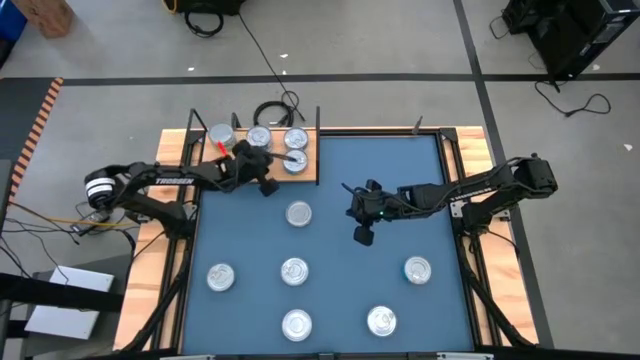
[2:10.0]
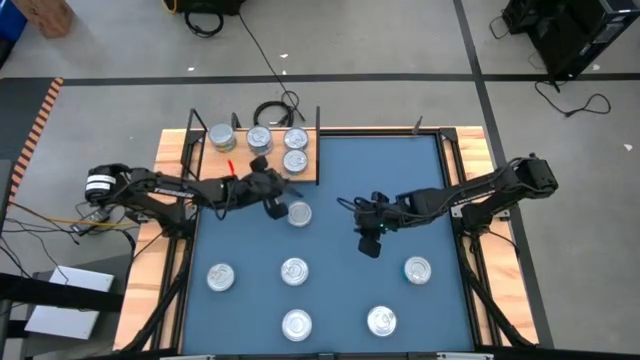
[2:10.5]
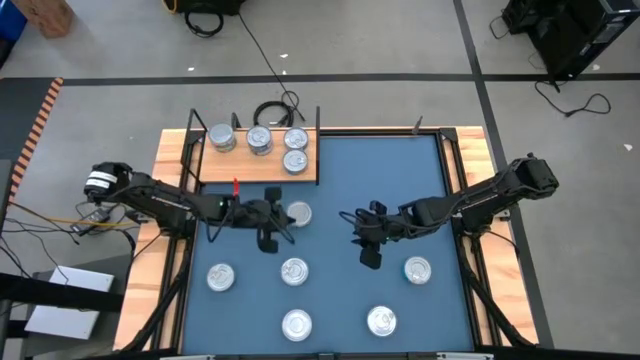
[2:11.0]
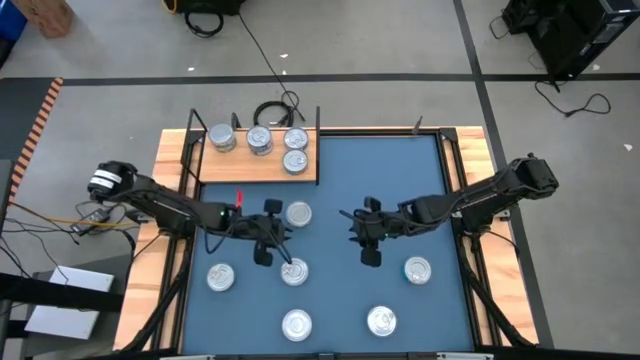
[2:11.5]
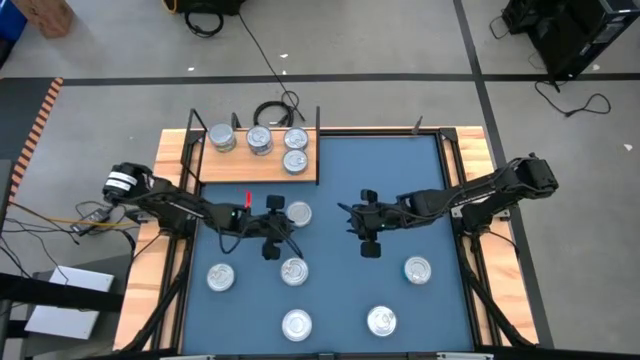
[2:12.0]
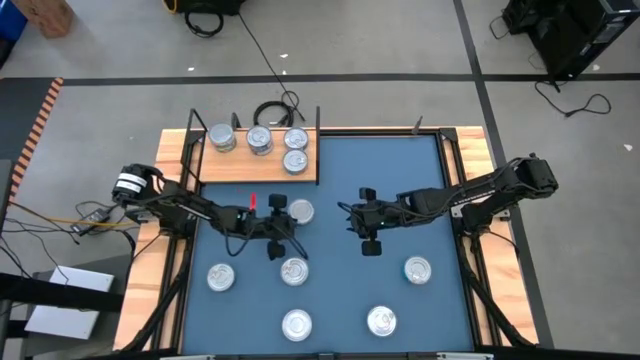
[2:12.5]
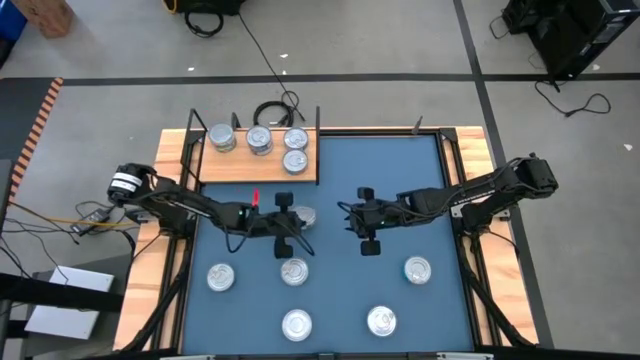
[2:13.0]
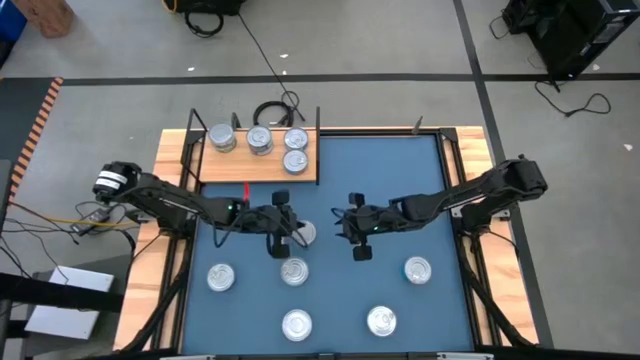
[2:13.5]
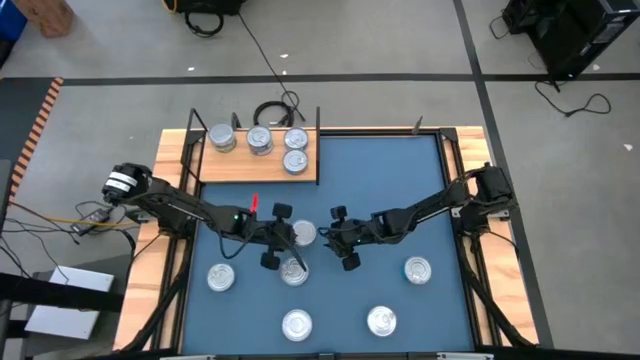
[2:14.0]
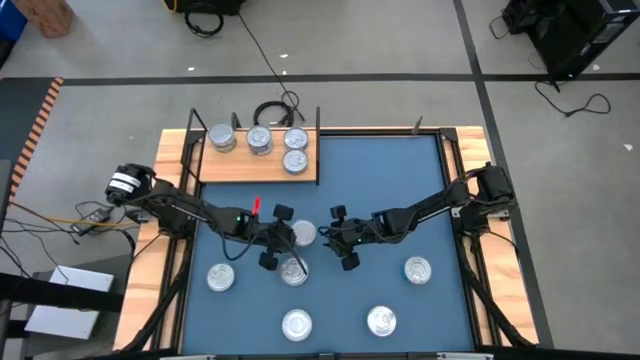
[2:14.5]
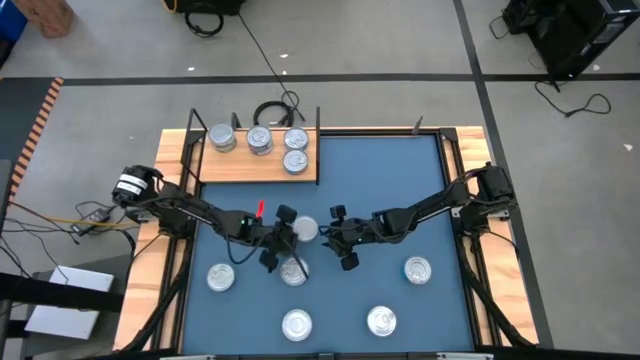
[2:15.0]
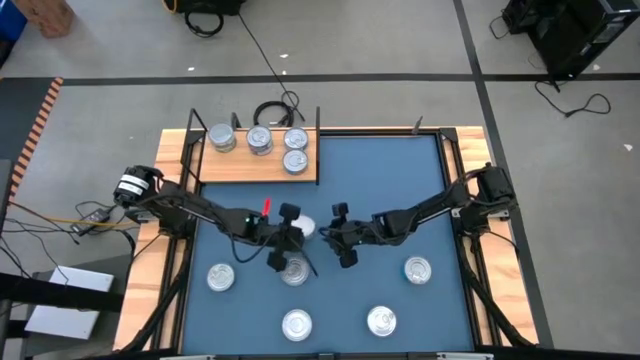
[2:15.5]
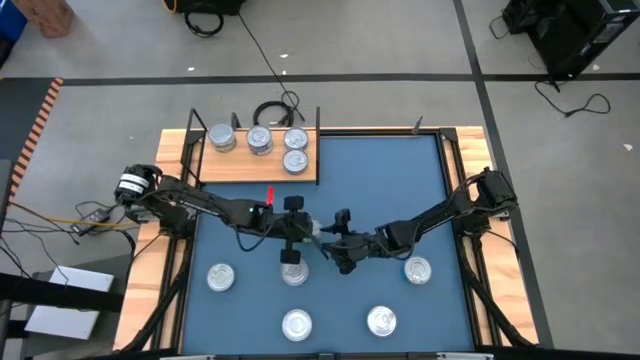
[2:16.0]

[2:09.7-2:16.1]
Task: Stack canned seafood by type on shelf
Put the green tuna can on the shelf aligned with the other green tuna can

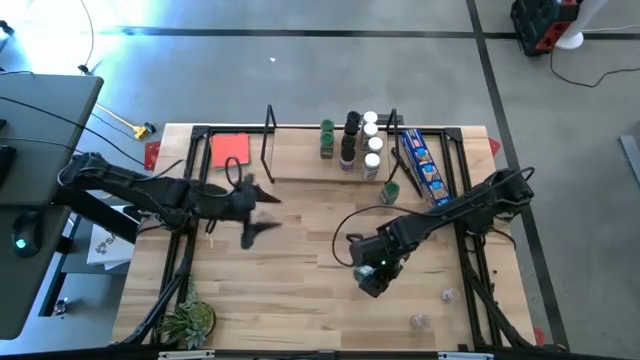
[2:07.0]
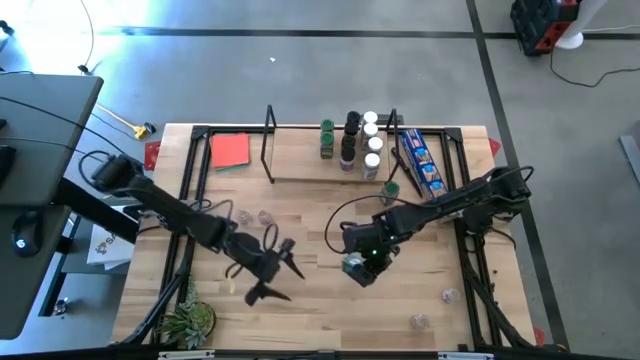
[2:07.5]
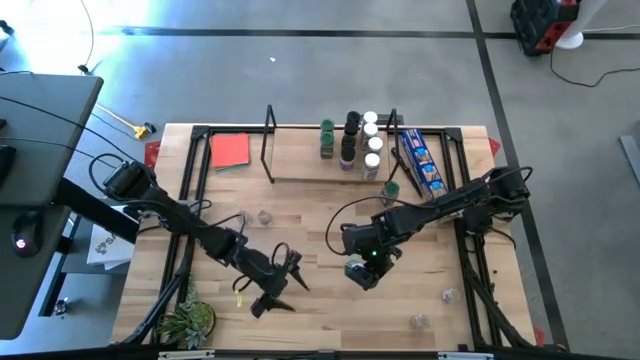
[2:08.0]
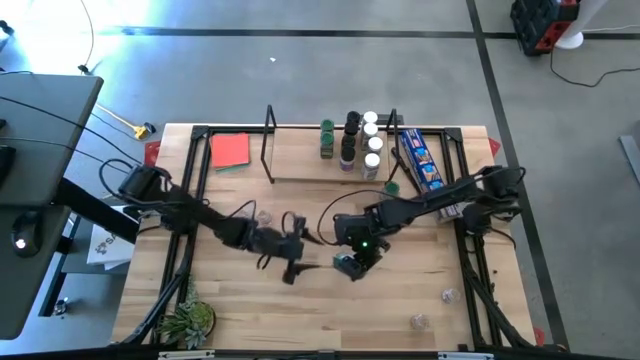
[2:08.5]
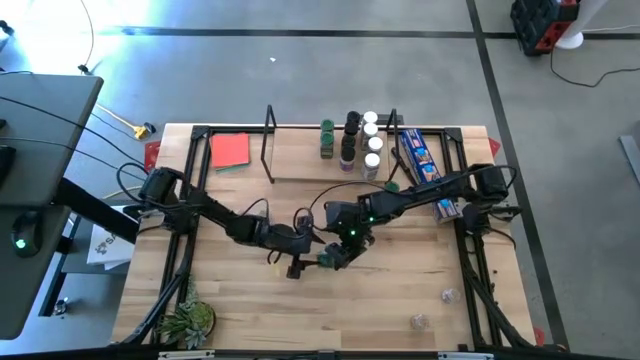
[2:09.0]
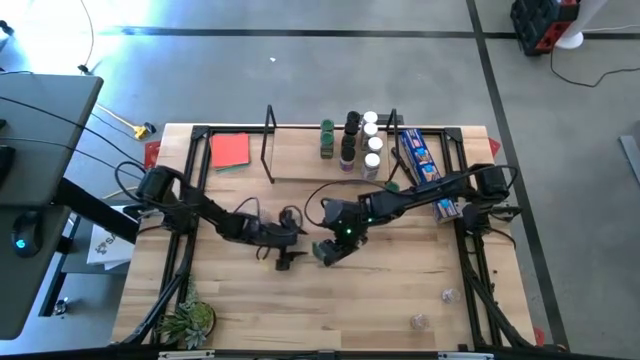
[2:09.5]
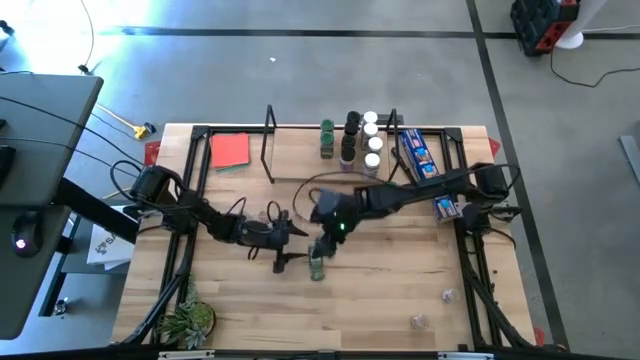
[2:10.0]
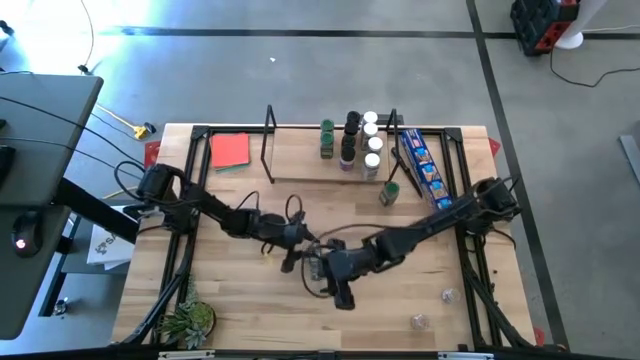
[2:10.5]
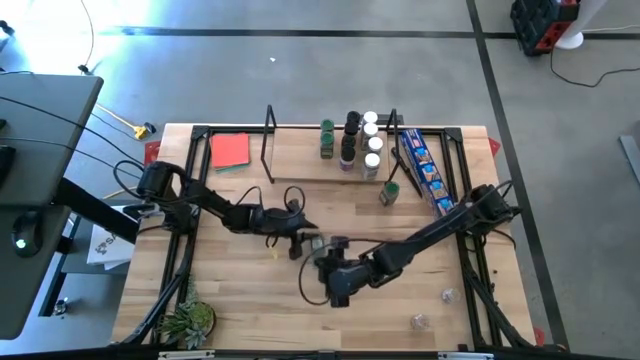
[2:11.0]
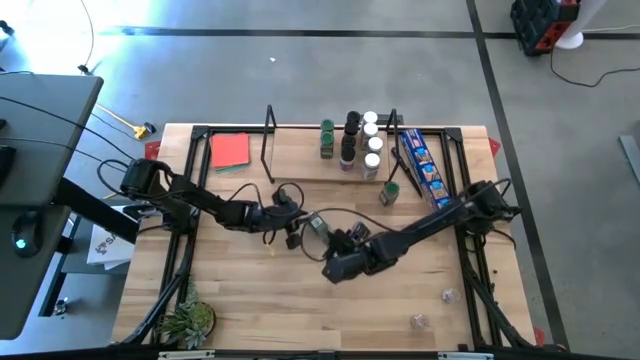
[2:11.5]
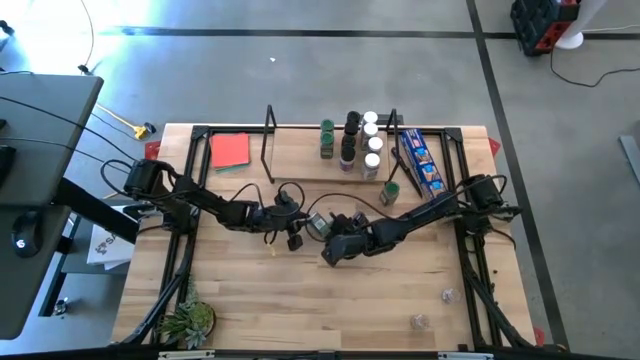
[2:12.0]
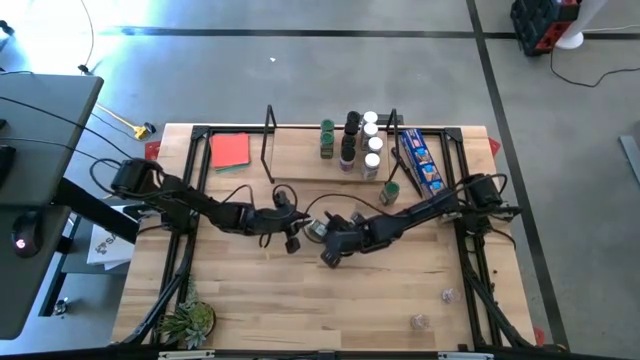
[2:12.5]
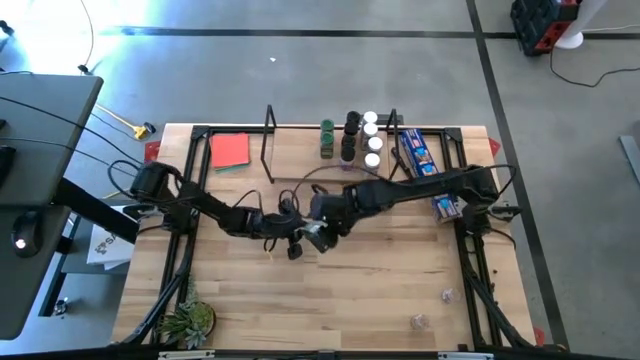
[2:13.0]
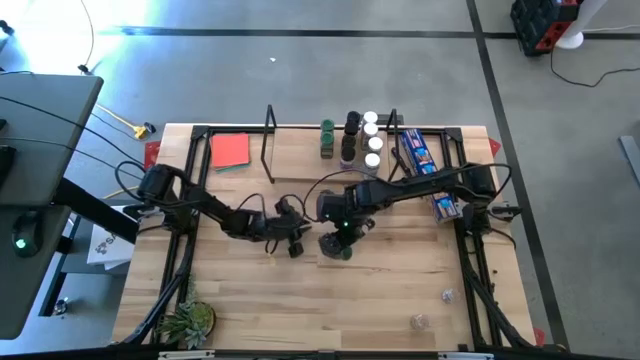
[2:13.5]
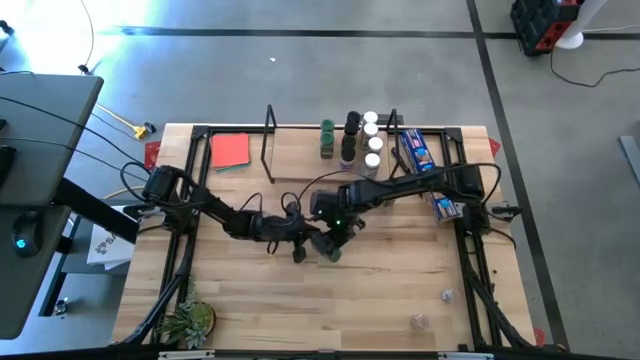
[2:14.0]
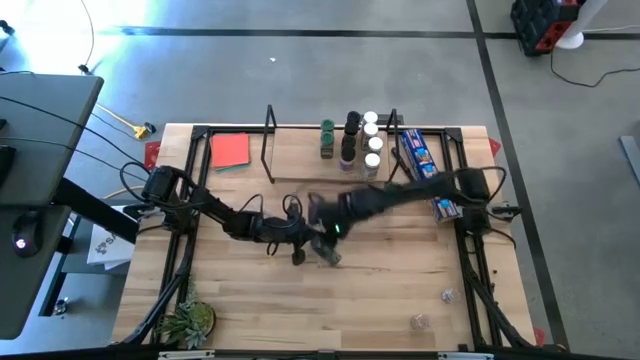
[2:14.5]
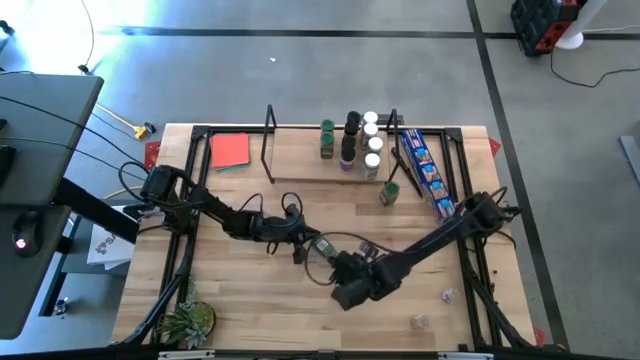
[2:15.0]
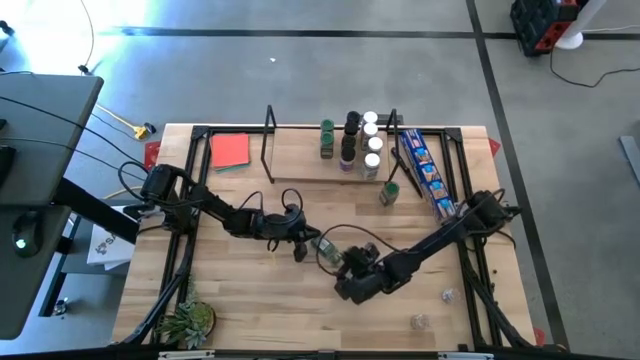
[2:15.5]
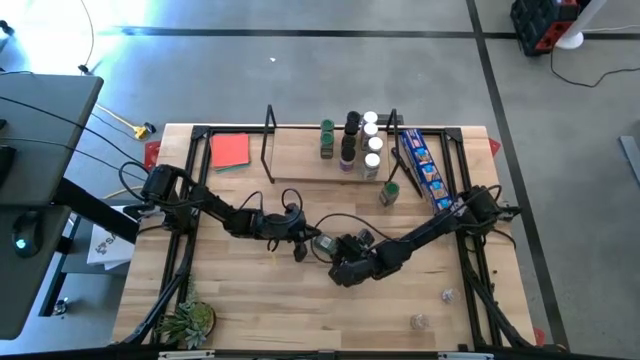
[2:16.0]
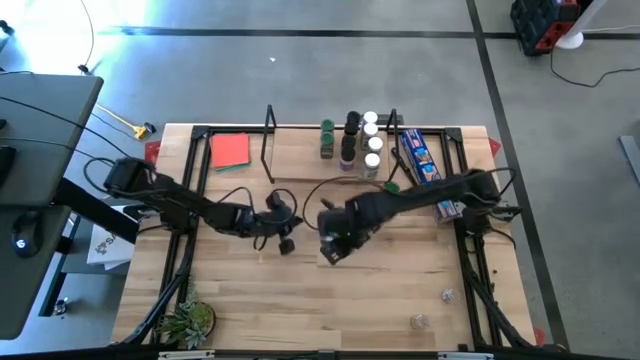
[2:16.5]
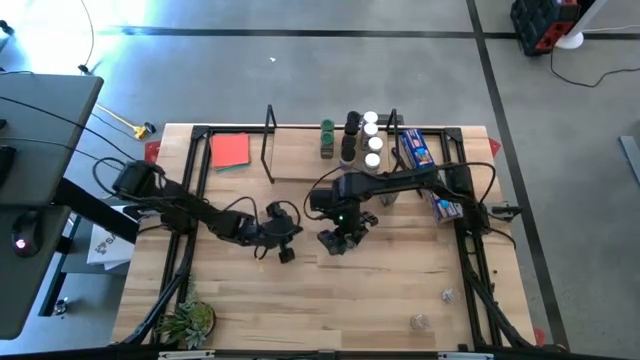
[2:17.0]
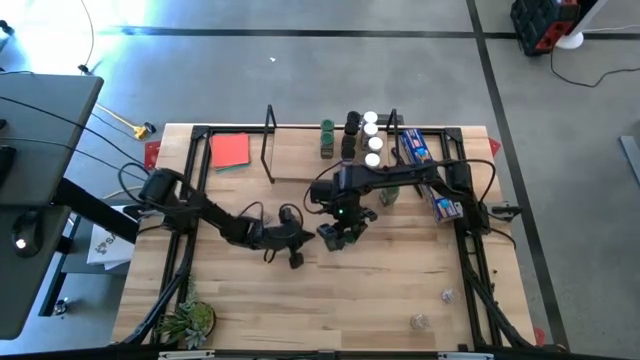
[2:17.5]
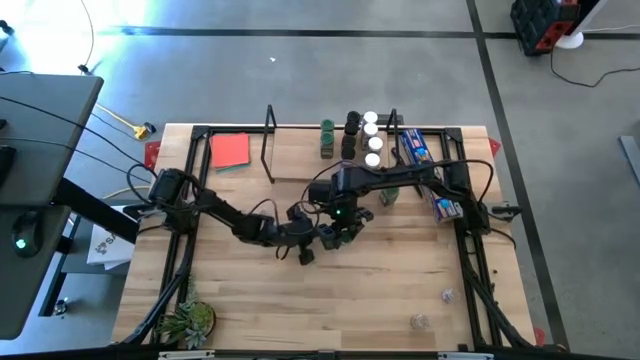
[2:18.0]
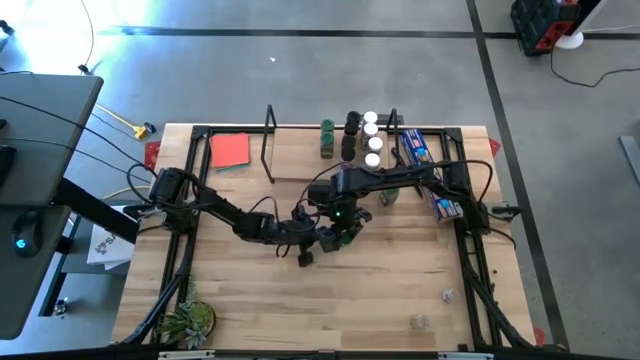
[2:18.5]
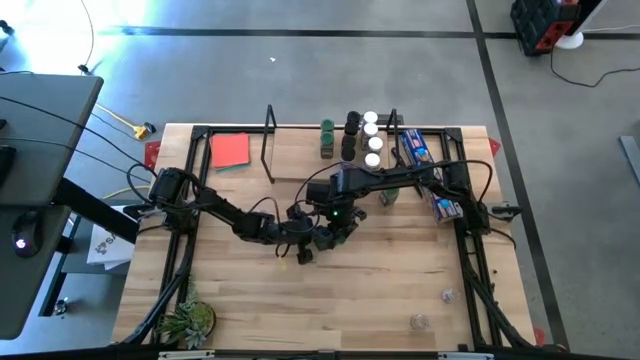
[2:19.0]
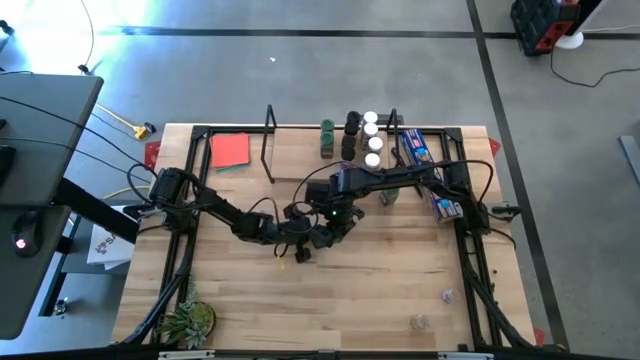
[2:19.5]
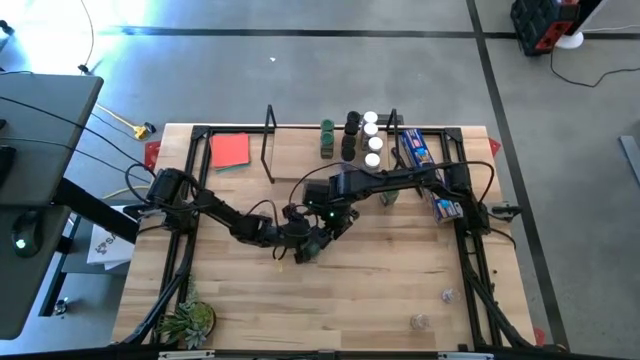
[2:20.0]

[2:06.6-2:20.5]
Task: Shelf spices
Put the left green seasoning bottle on the shelf aligned with the other green seasoning bottles
